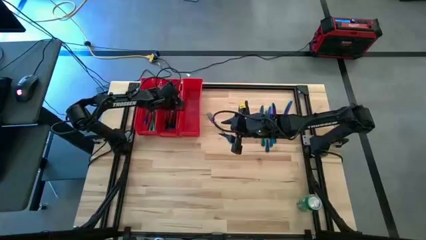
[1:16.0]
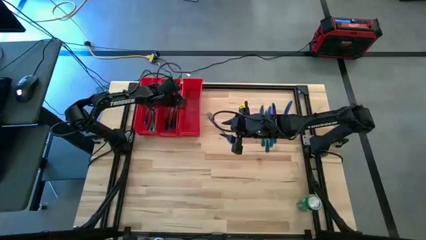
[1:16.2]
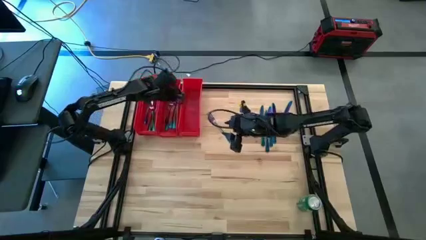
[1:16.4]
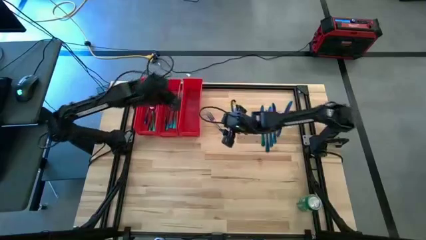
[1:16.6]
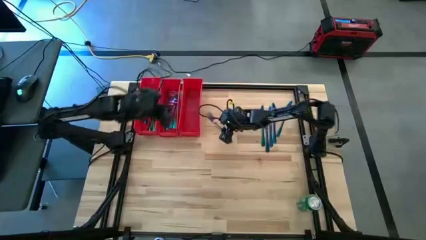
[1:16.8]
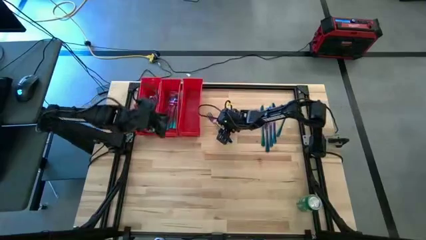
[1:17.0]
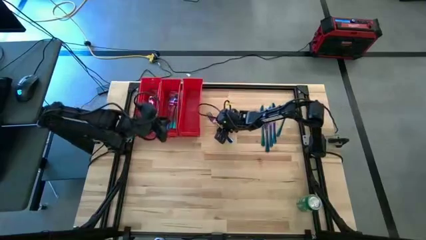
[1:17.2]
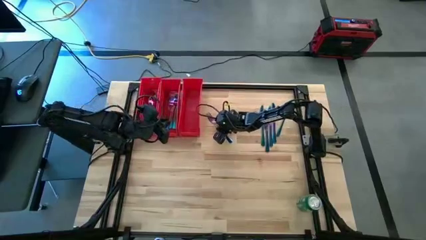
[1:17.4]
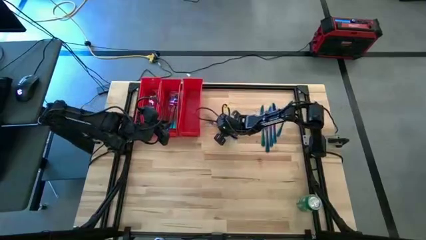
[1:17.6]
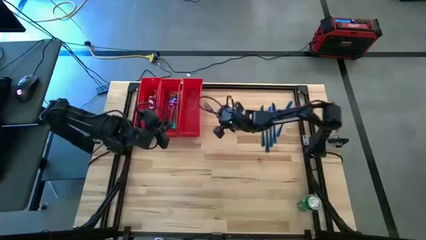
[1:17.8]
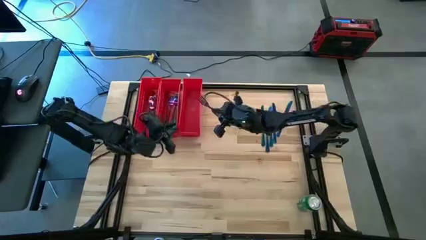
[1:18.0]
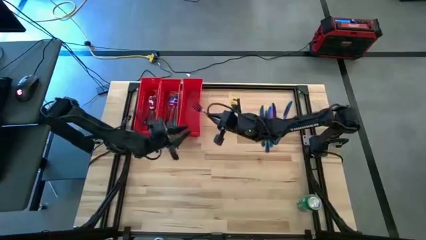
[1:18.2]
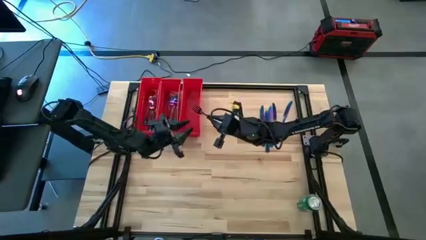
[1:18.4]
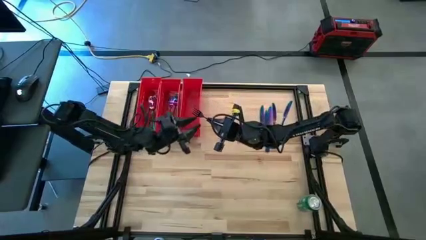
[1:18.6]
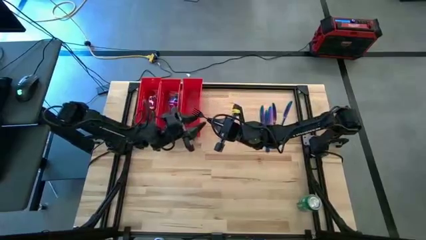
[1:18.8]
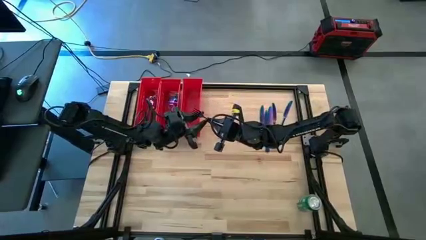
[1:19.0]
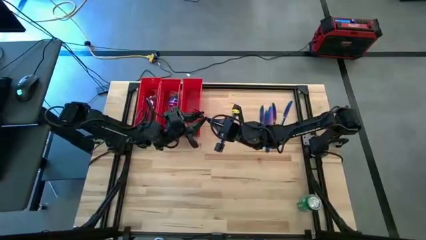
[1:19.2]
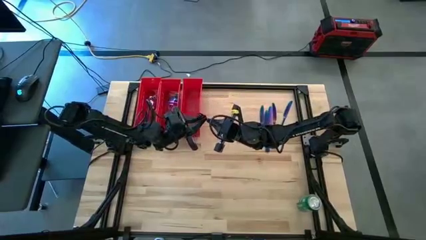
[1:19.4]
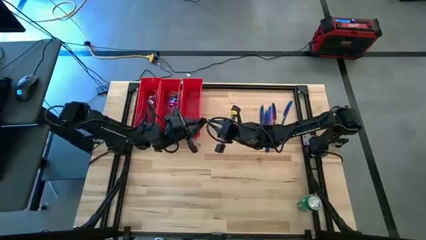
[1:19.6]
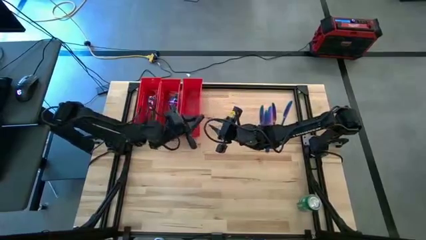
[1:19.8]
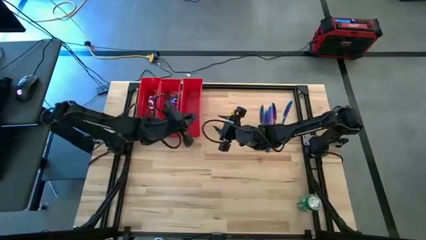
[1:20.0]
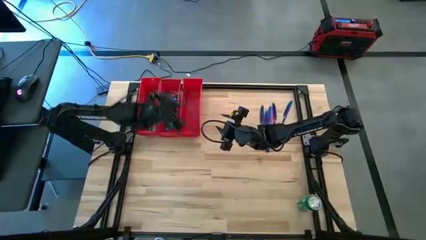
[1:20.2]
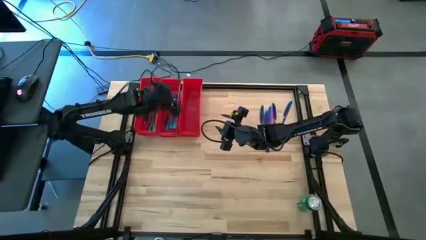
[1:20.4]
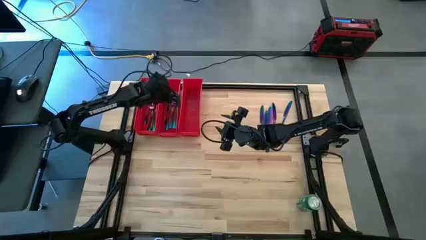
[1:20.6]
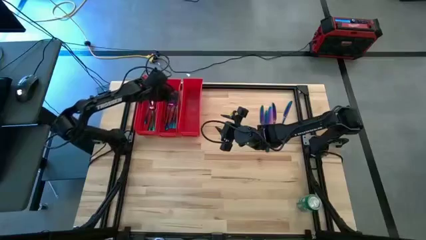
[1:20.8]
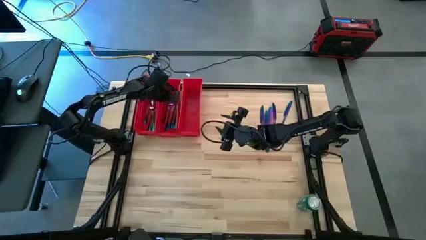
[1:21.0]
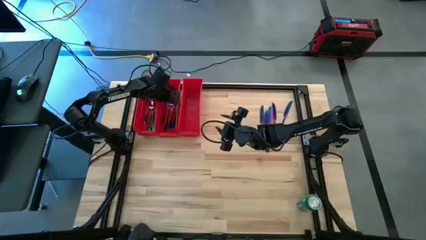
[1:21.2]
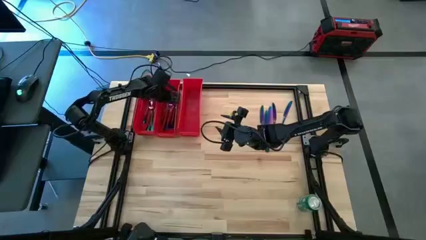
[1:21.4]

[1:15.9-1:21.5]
Task: Sort silverware
Put the blue fork into the middle red bin

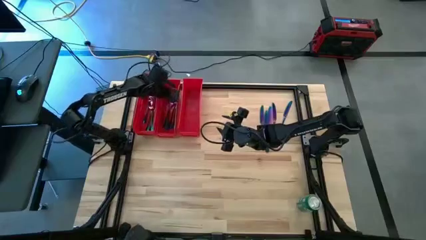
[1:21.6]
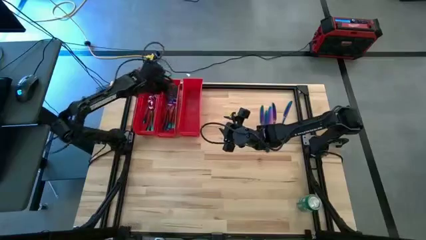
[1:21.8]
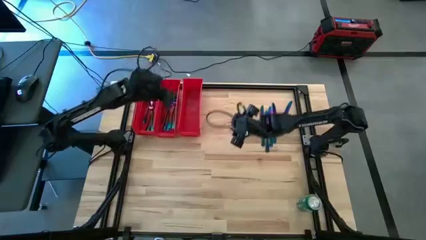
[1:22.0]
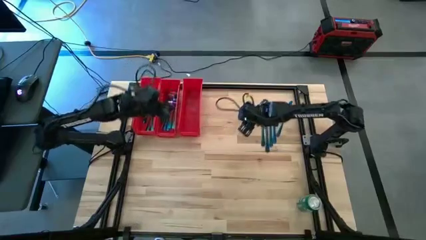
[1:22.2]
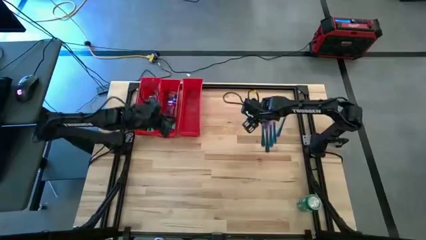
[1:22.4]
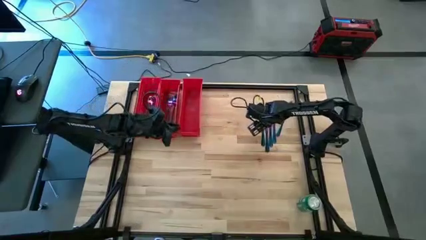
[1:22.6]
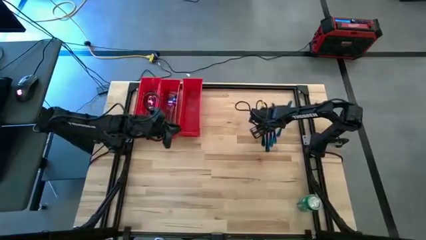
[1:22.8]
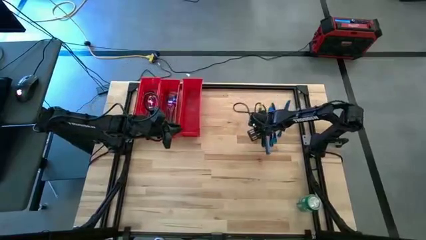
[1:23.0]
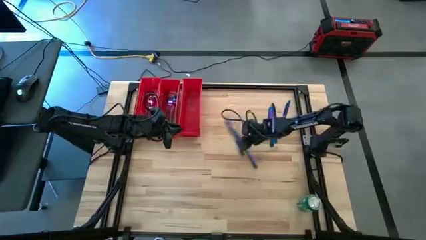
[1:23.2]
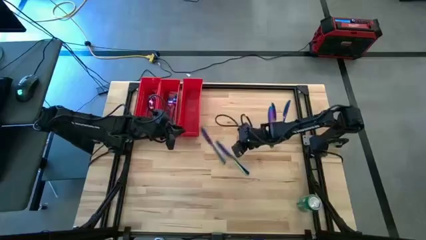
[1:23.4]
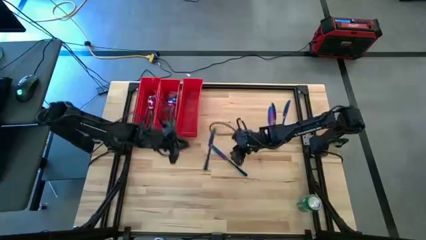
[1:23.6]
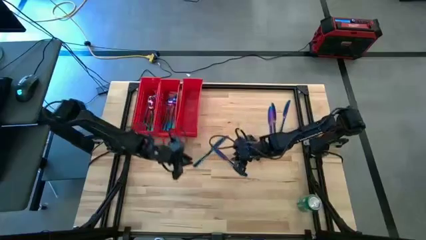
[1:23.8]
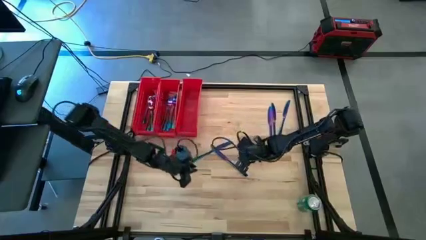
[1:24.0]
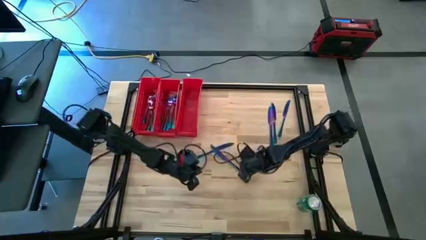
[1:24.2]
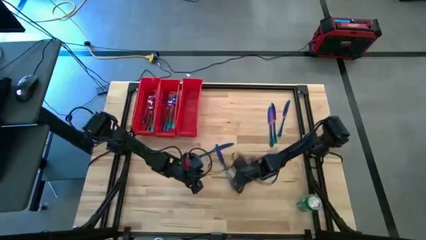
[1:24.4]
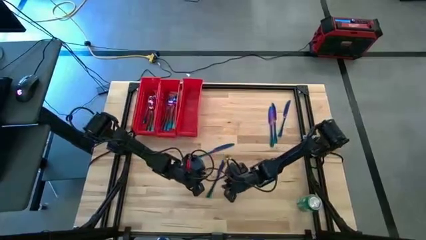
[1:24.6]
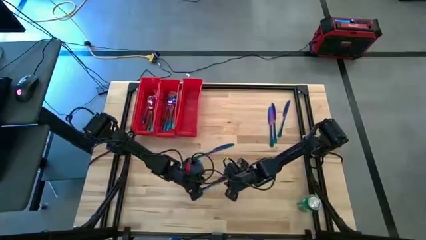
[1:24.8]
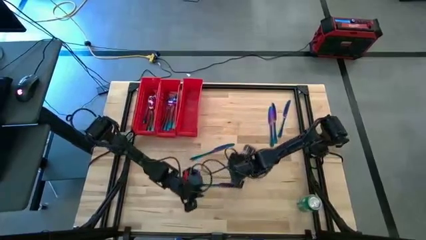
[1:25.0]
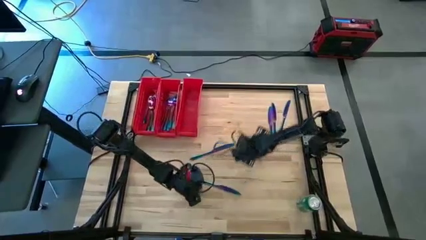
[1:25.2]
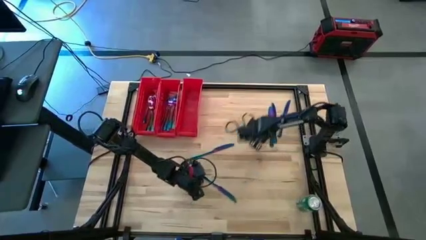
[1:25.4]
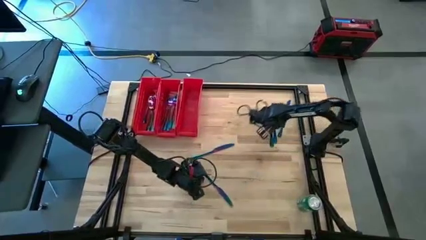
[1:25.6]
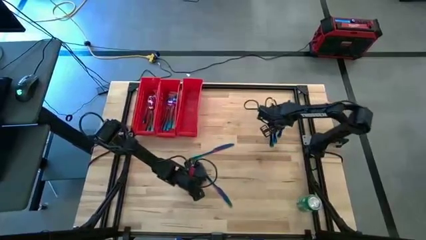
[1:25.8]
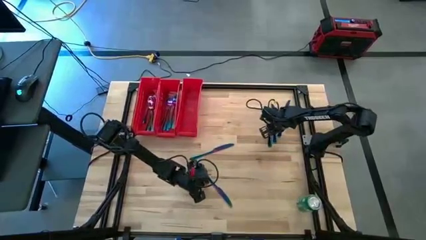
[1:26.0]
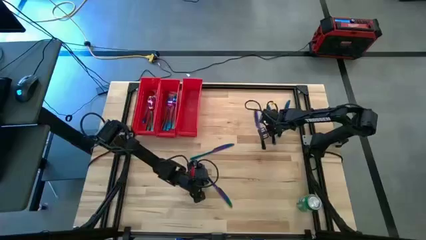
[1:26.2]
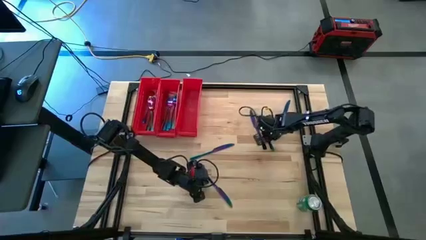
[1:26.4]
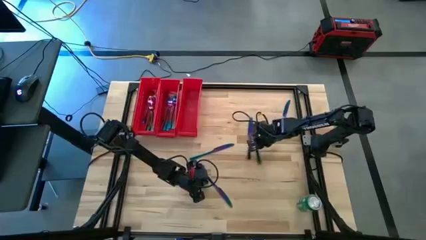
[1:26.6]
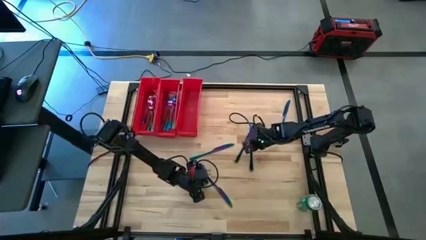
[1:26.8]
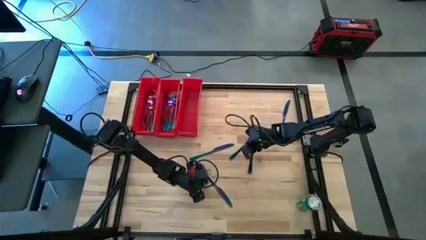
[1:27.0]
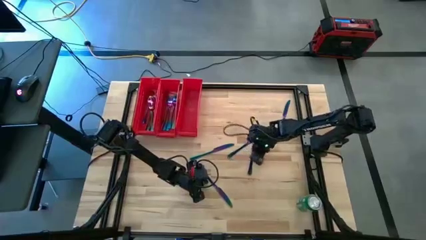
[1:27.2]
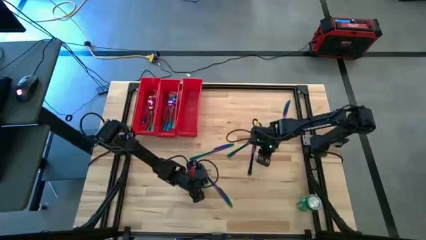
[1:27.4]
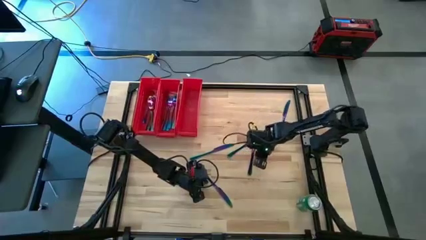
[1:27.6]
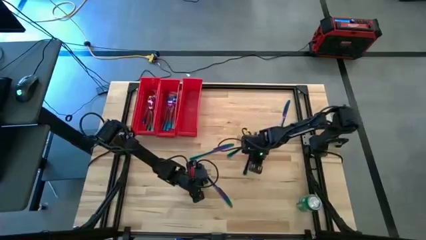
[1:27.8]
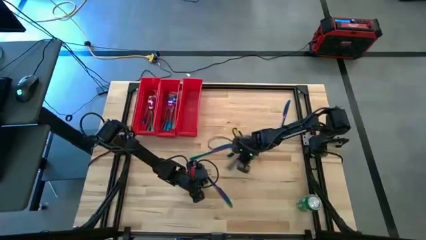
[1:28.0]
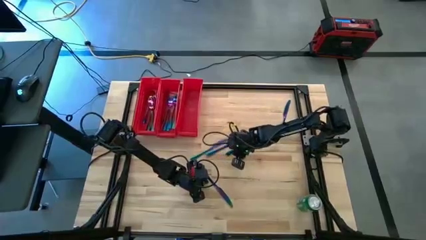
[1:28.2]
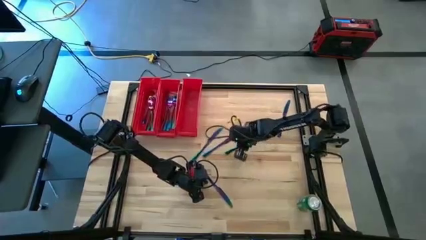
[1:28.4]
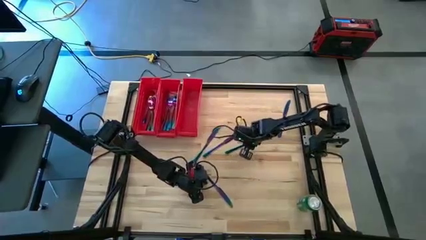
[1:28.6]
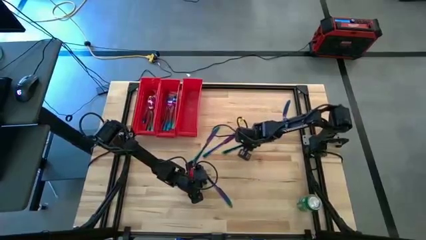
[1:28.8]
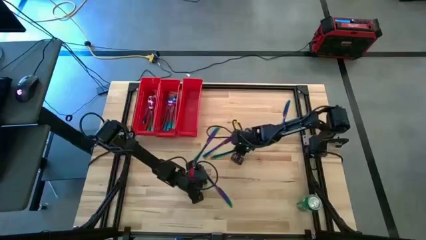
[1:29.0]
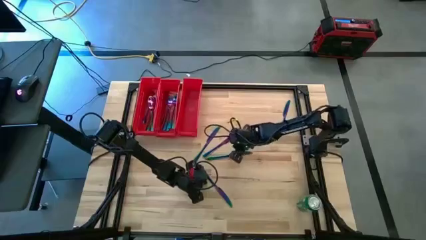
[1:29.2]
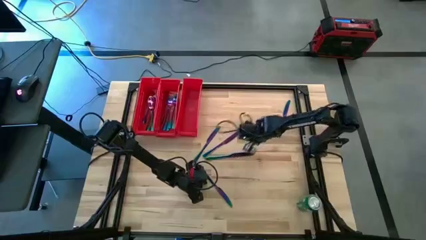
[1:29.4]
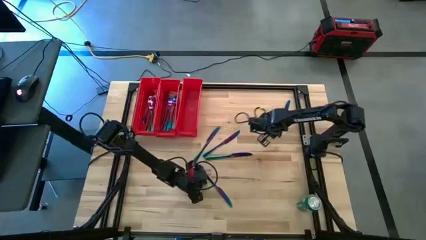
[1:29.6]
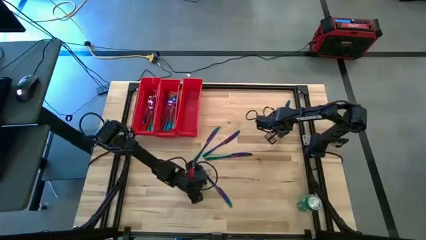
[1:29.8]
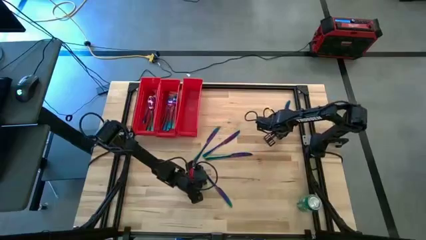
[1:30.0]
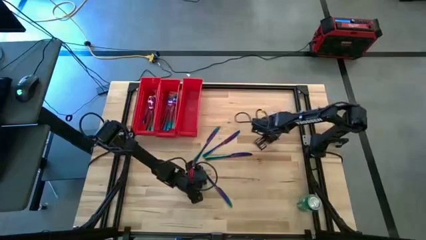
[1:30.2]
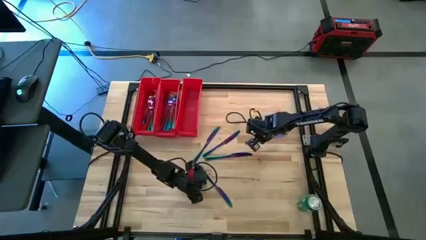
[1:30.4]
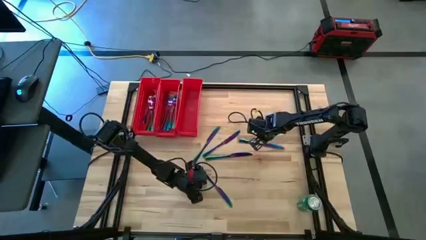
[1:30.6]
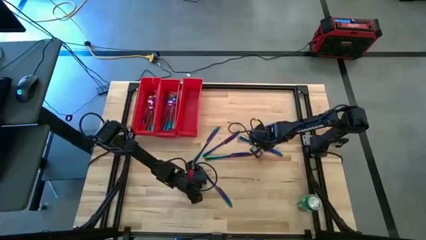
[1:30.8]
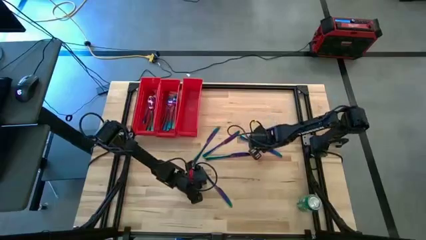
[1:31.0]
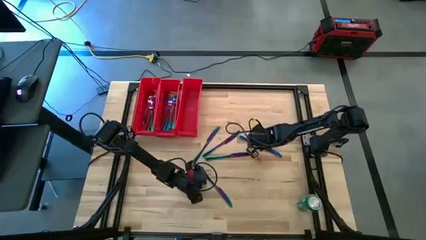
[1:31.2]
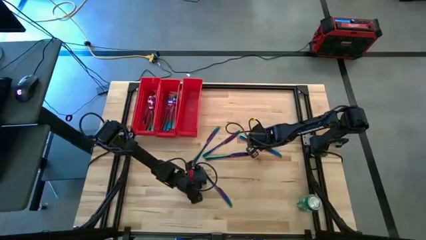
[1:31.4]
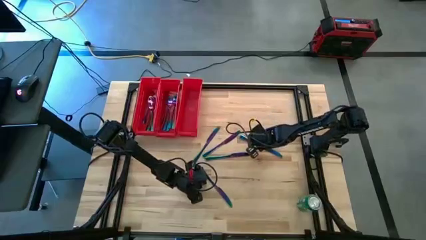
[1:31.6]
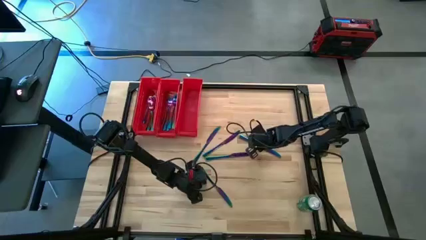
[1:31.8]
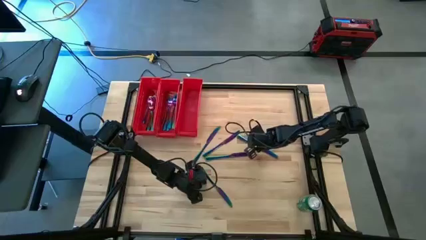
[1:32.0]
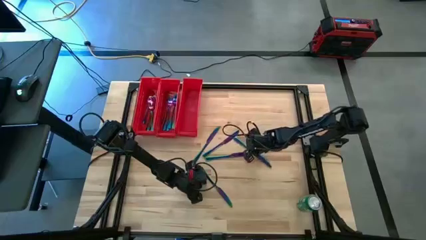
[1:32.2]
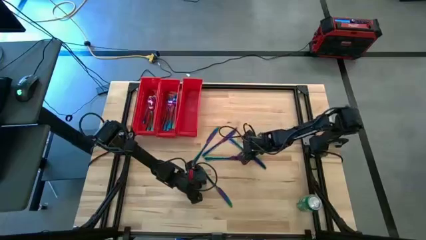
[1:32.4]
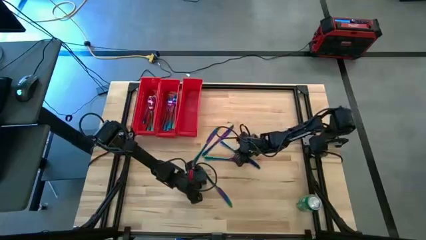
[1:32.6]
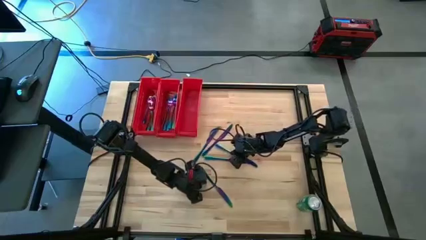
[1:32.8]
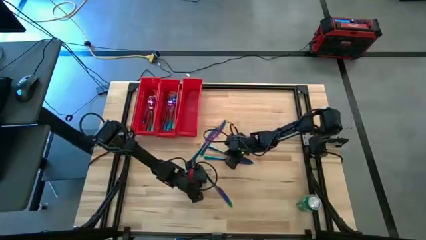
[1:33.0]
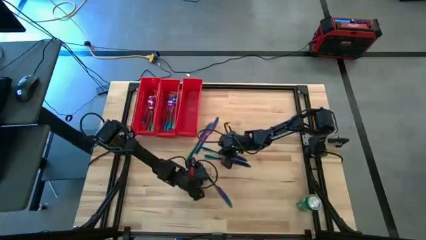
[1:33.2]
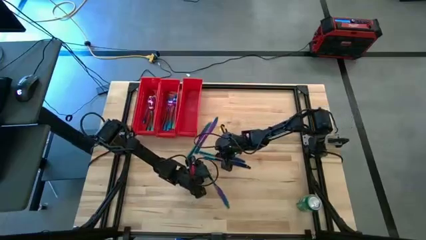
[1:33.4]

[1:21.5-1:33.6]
Move the table knives to the center of the table
